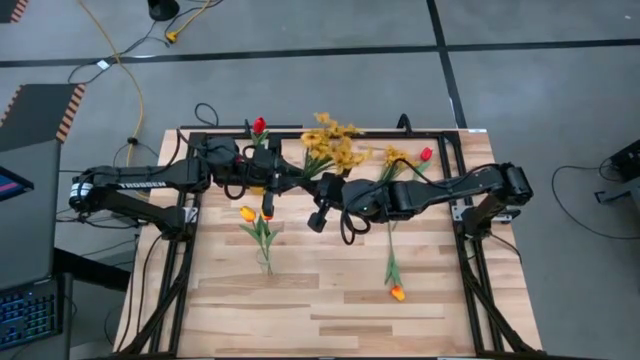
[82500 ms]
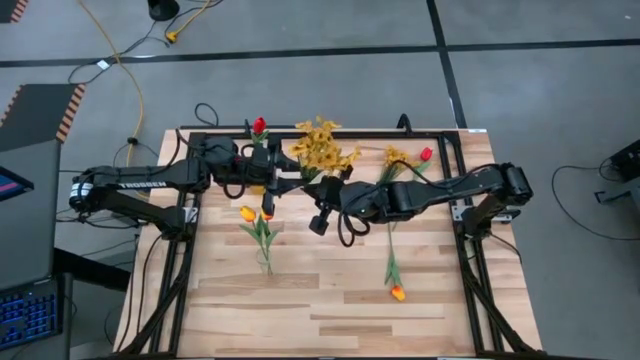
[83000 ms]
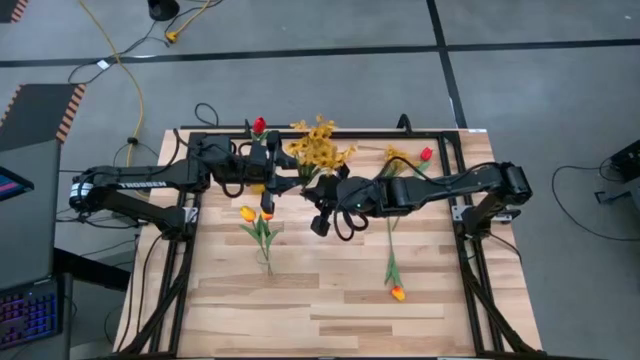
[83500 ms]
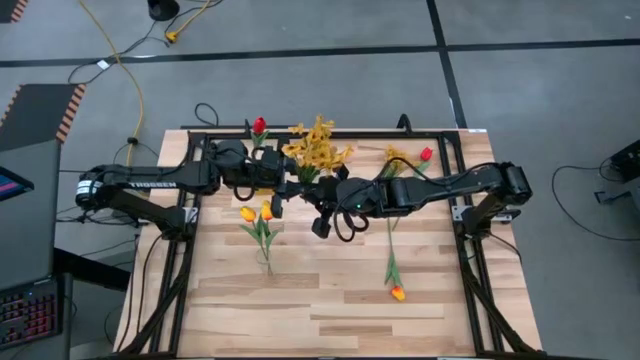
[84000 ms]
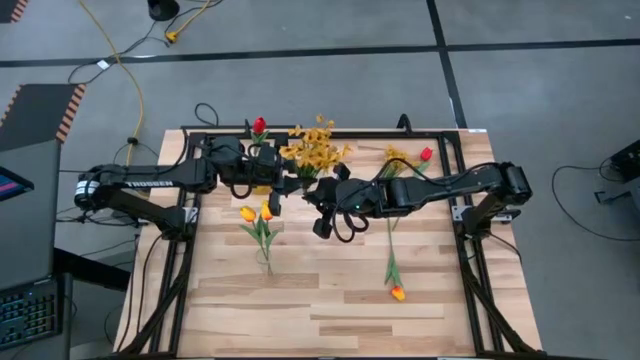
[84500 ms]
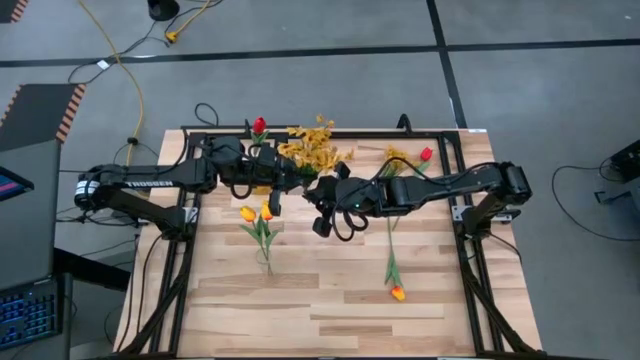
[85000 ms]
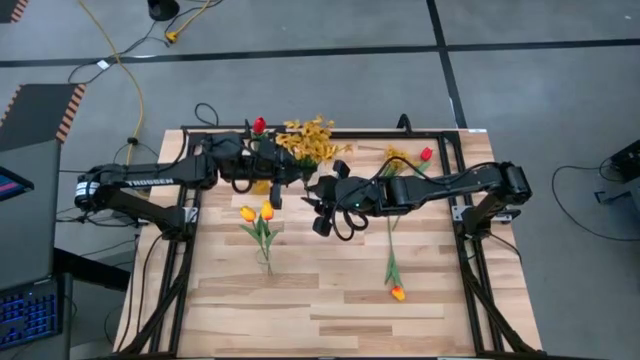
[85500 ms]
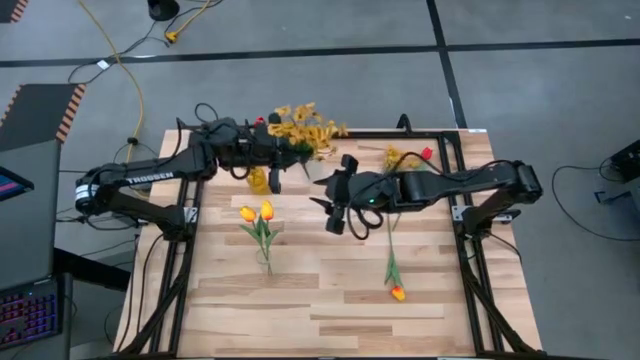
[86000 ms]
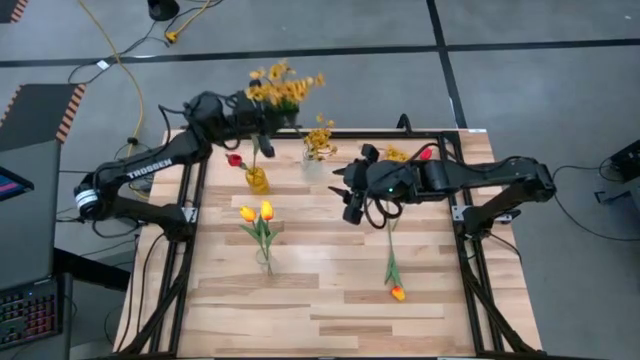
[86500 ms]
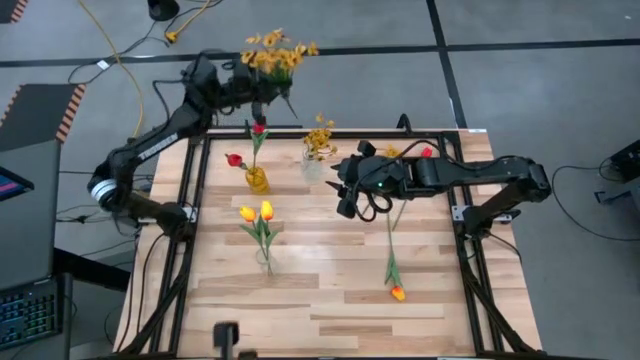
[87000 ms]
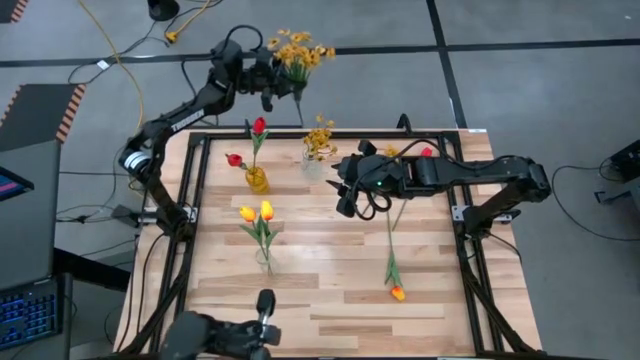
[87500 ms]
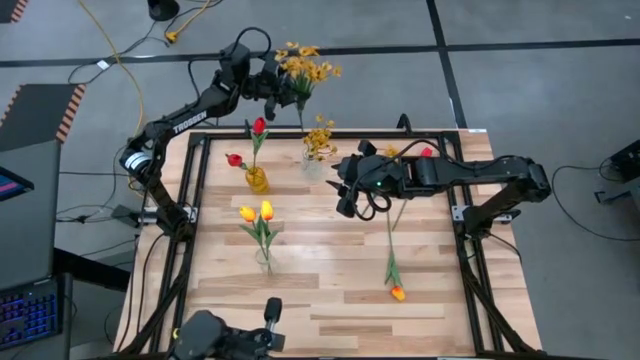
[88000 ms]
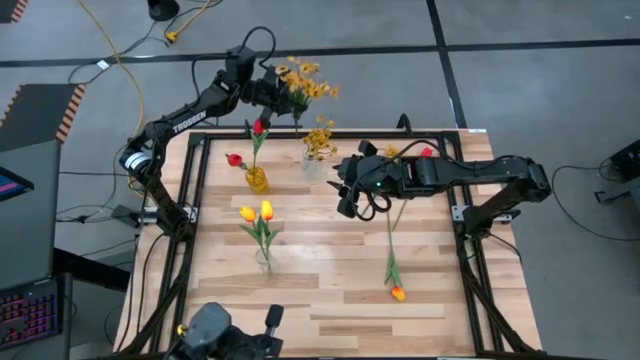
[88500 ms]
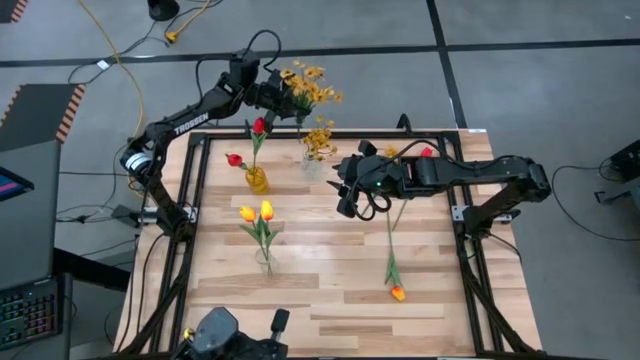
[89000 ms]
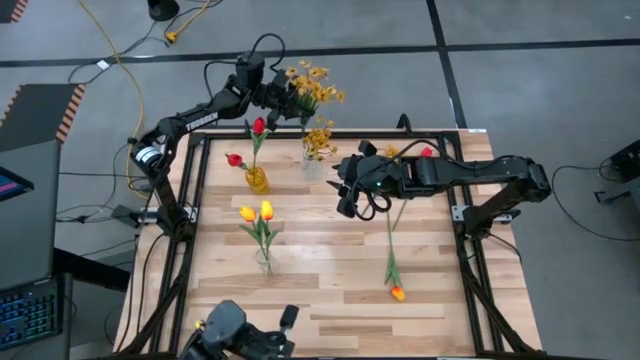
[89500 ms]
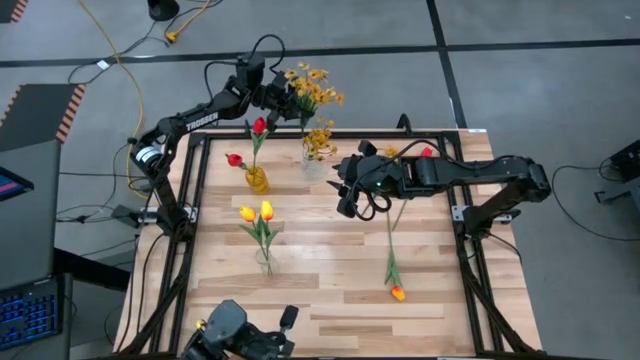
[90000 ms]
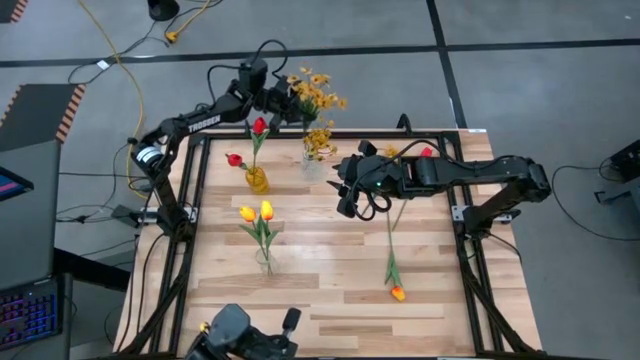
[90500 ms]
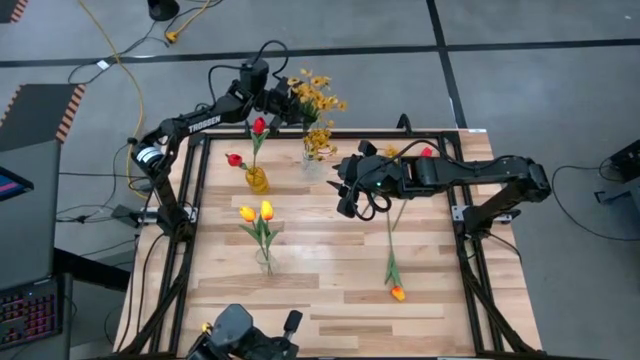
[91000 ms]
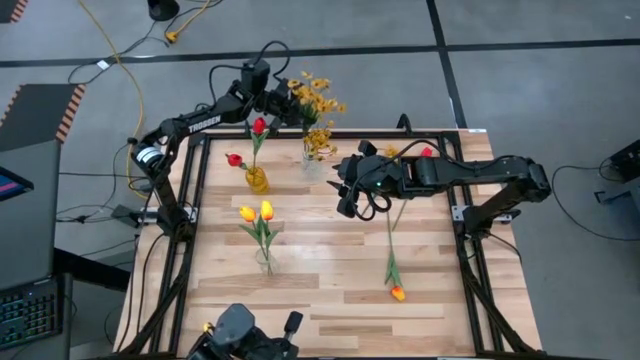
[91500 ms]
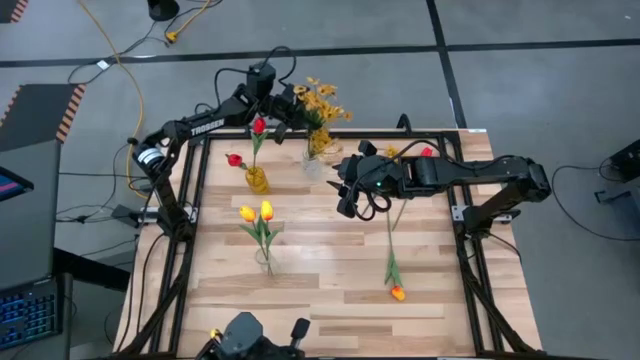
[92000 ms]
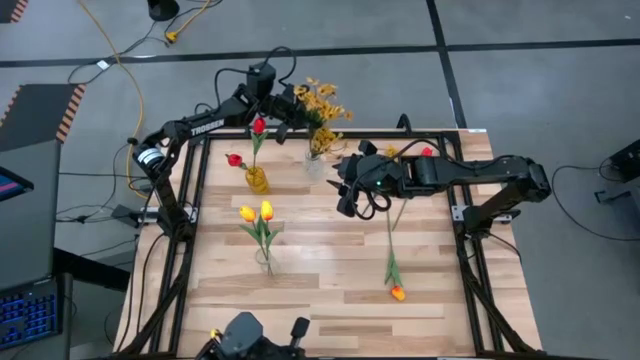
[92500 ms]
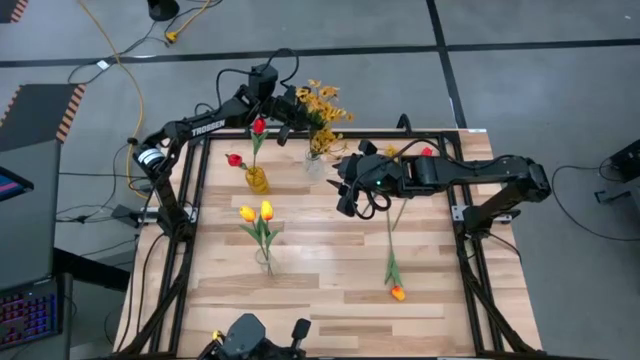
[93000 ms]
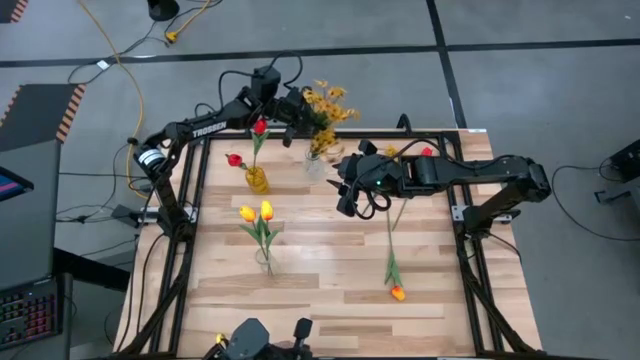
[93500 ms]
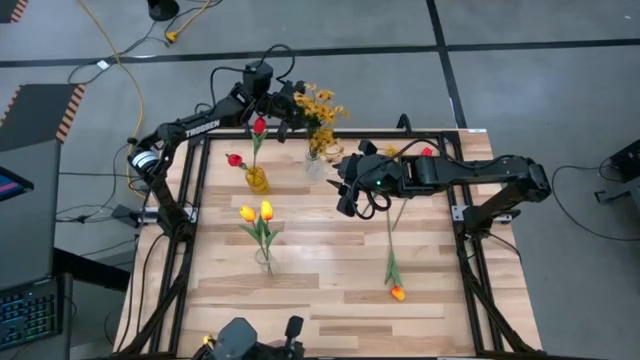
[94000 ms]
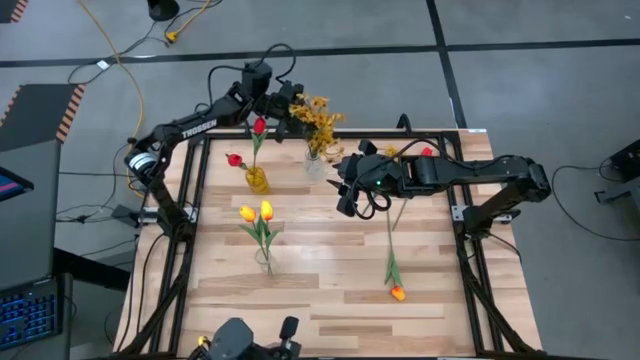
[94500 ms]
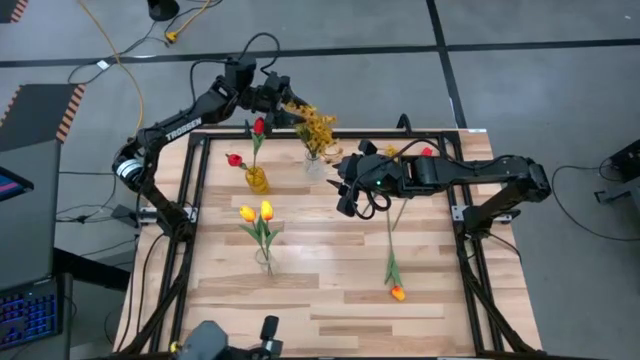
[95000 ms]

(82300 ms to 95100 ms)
Task: Sort flowers into vase by color
Put the right yellow flowers into the top transparent vase

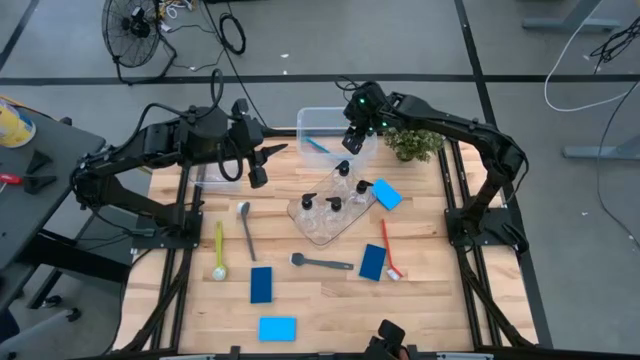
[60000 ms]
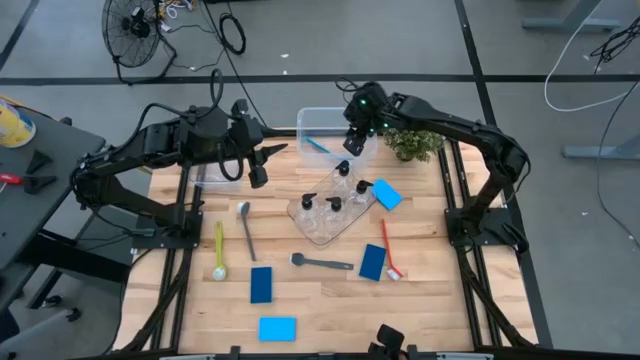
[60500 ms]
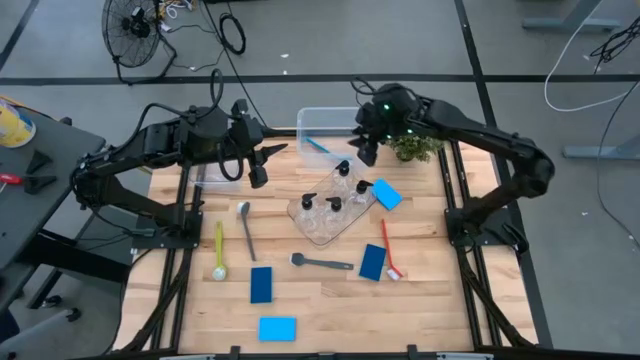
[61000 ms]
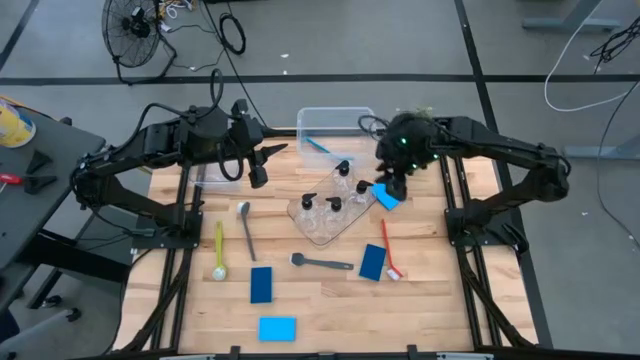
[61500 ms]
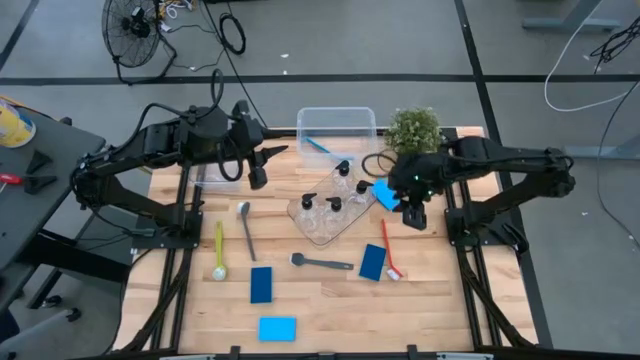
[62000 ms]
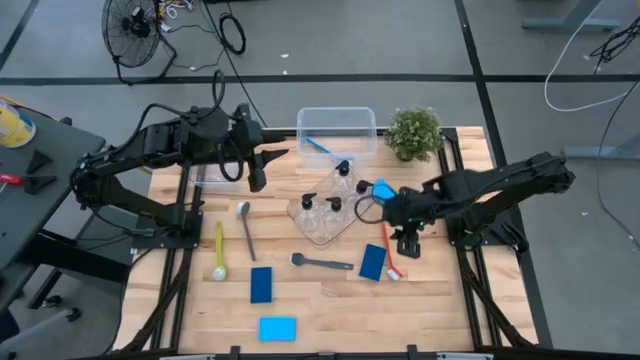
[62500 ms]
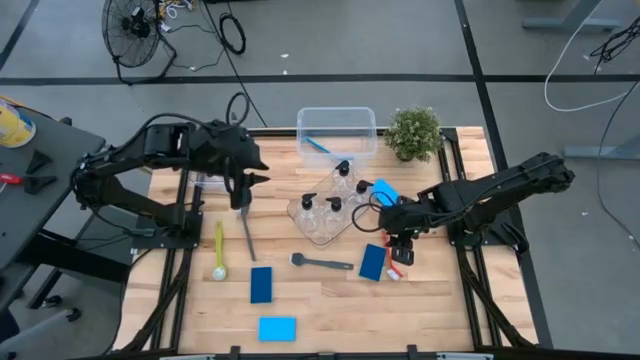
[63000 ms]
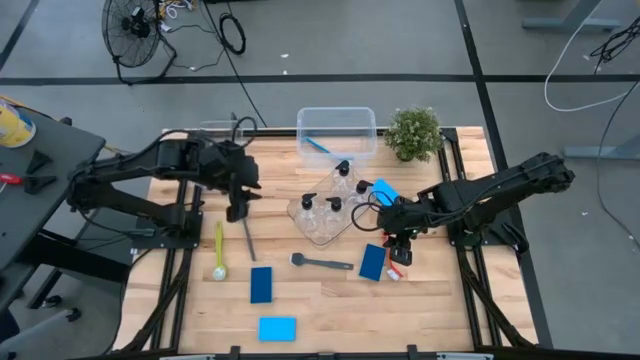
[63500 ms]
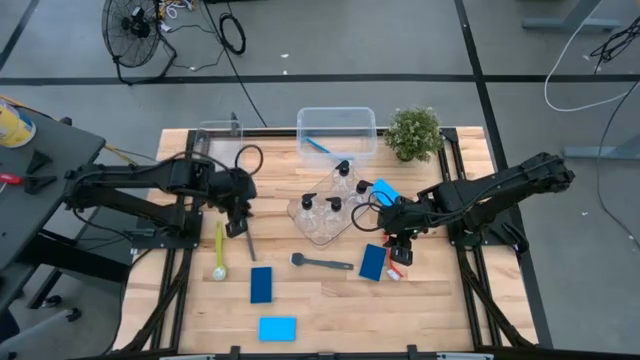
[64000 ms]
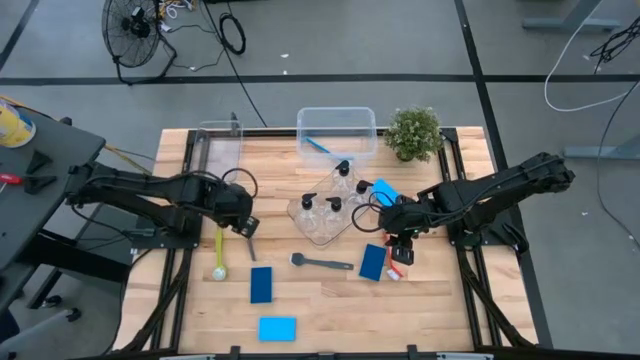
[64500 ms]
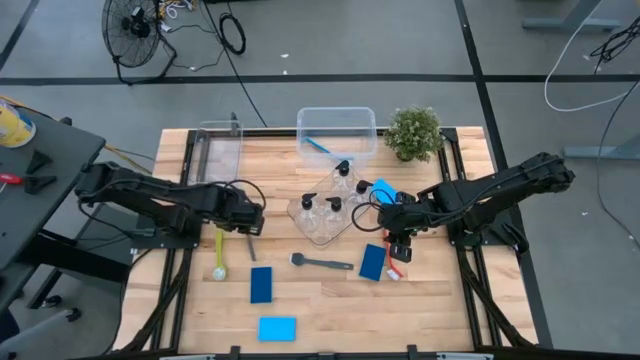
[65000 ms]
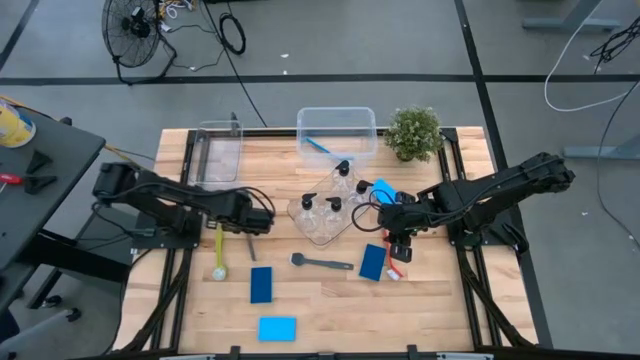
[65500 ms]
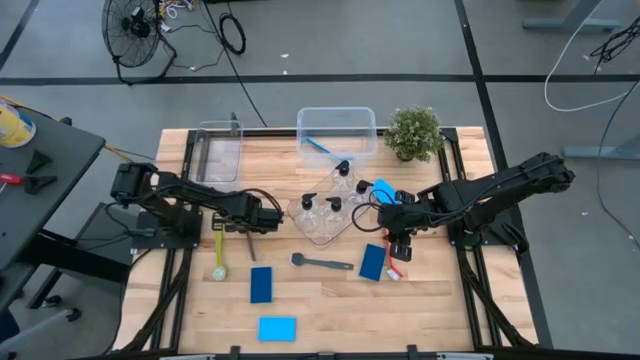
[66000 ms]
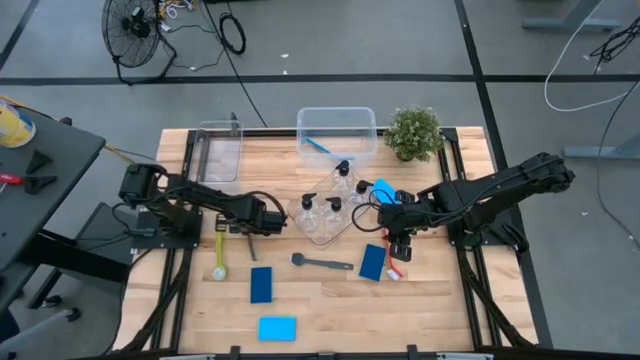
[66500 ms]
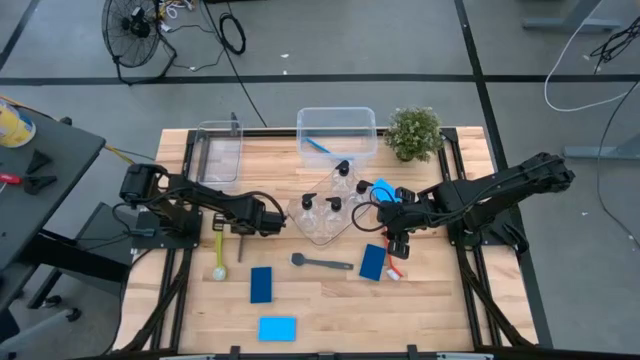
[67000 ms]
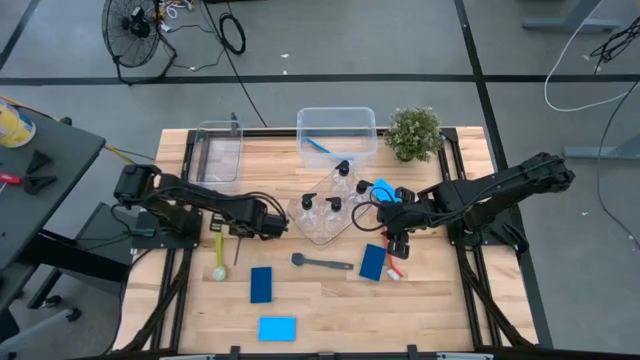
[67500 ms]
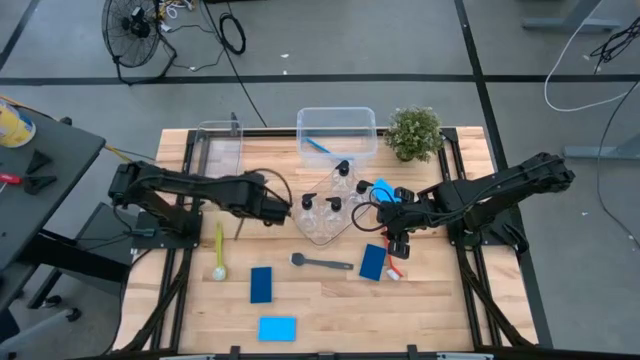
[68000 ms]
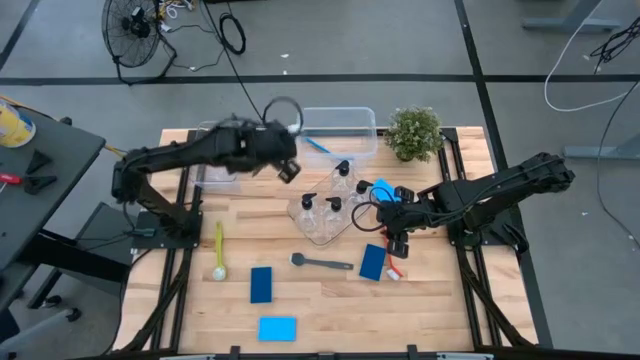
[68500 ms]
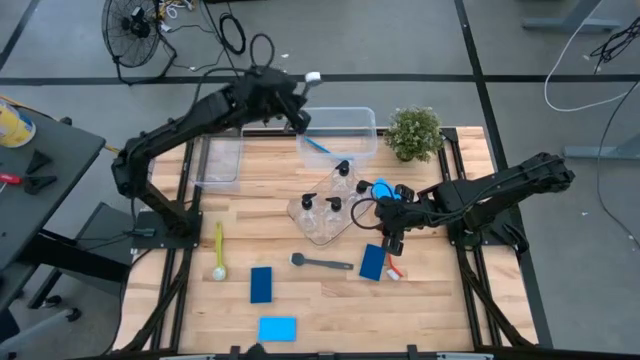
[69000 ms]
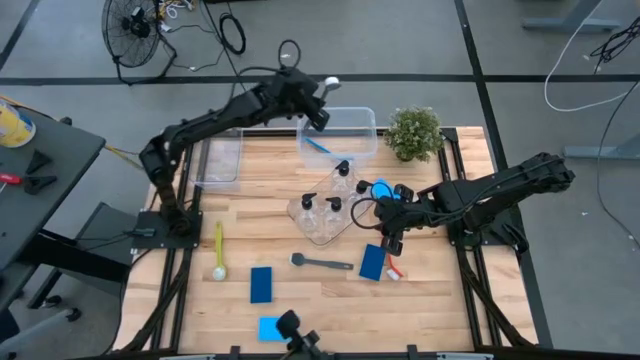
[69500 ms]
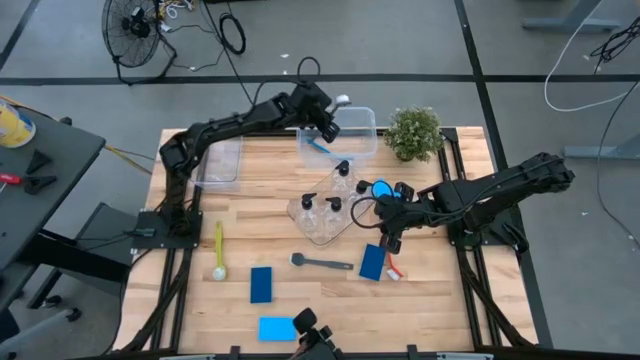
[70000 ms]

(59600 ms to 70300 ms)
Task: Pick & Place Kitchen Sink Supplies
Put the gray dishwashing brush into the transparent container
